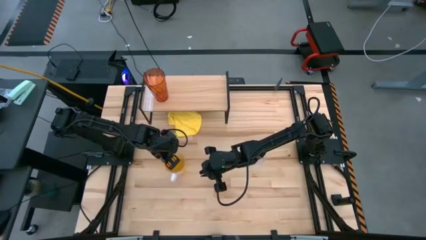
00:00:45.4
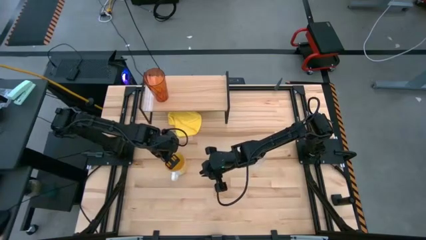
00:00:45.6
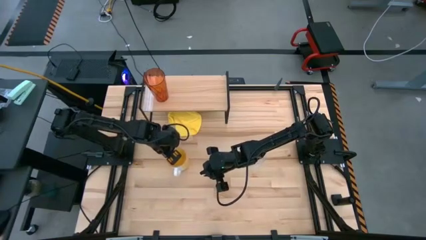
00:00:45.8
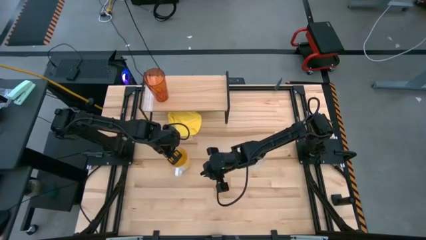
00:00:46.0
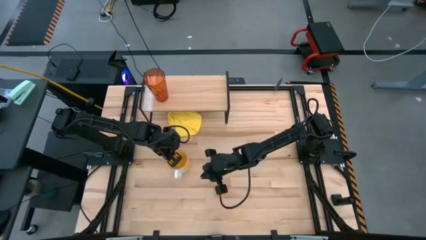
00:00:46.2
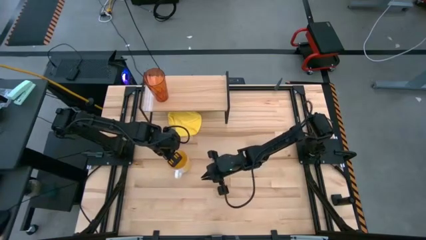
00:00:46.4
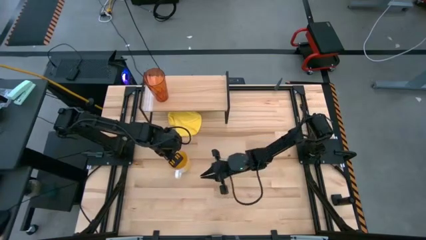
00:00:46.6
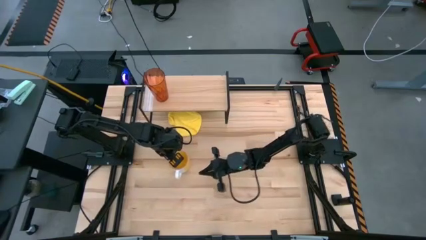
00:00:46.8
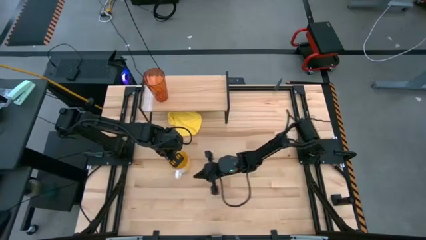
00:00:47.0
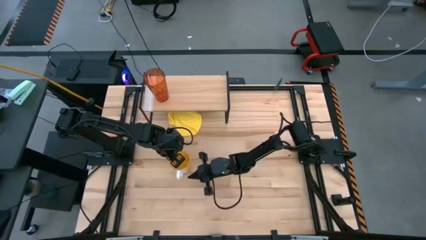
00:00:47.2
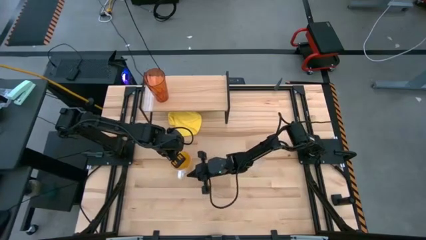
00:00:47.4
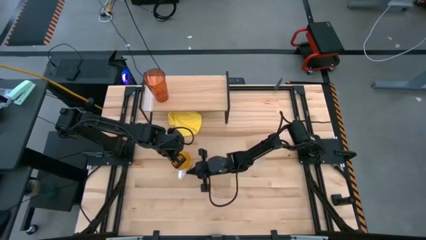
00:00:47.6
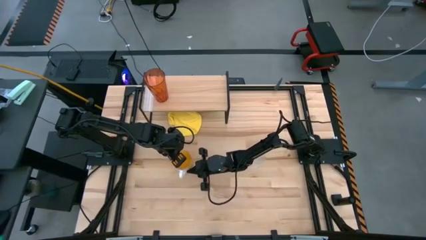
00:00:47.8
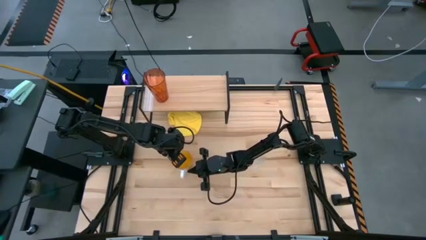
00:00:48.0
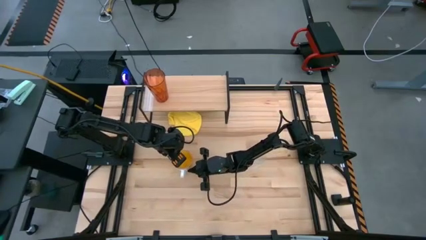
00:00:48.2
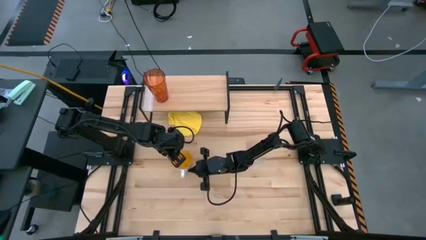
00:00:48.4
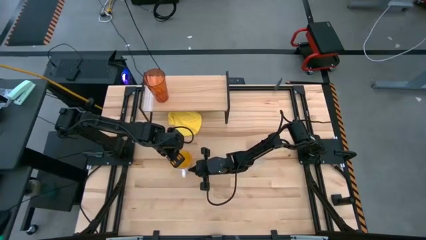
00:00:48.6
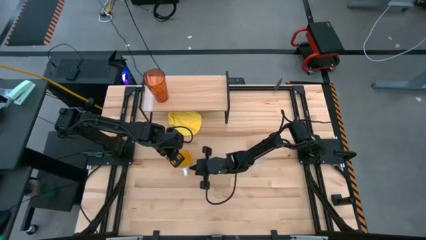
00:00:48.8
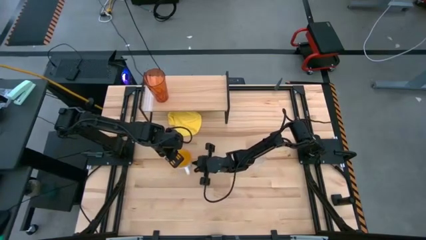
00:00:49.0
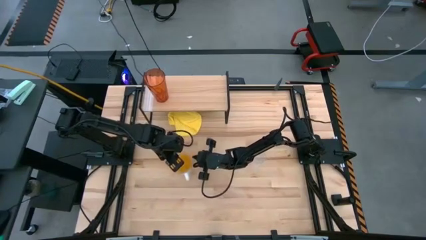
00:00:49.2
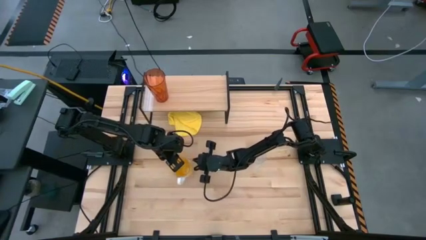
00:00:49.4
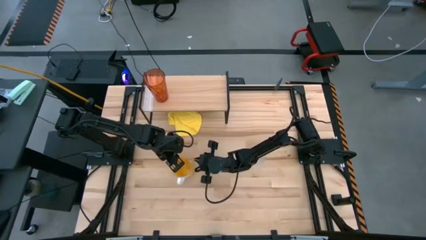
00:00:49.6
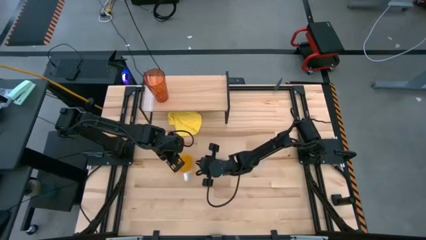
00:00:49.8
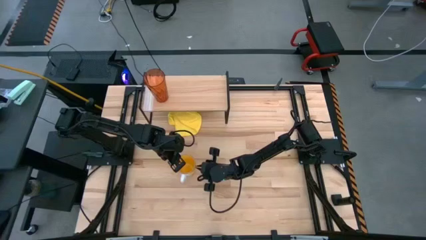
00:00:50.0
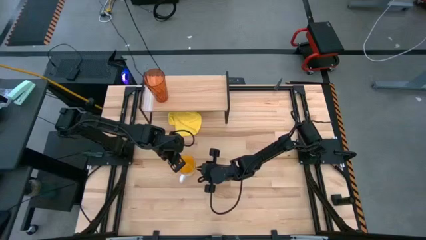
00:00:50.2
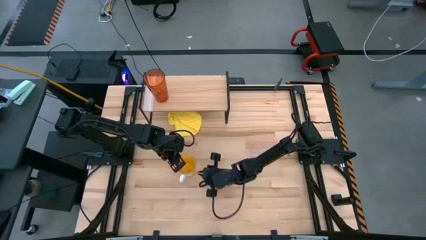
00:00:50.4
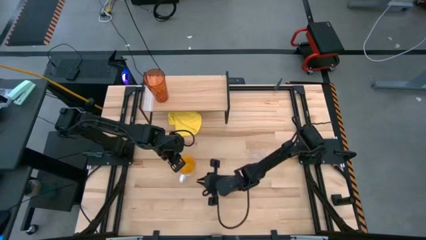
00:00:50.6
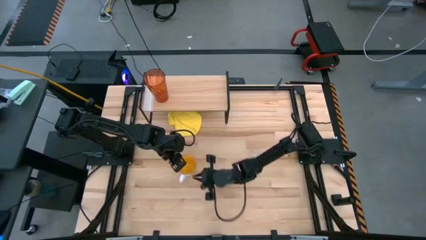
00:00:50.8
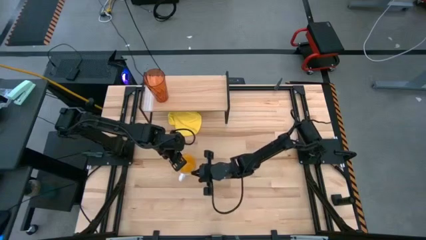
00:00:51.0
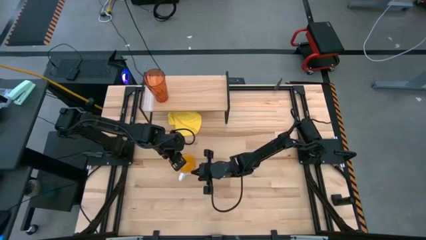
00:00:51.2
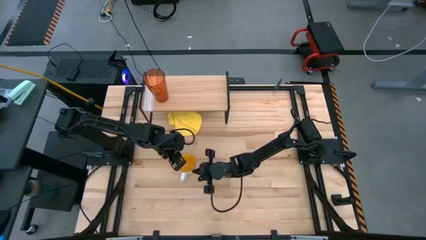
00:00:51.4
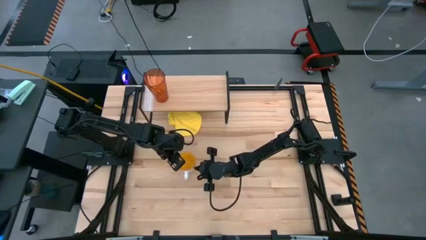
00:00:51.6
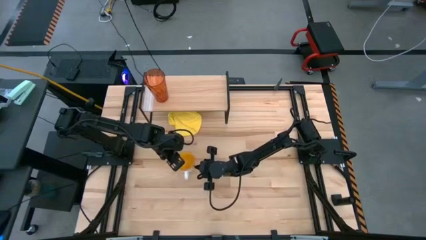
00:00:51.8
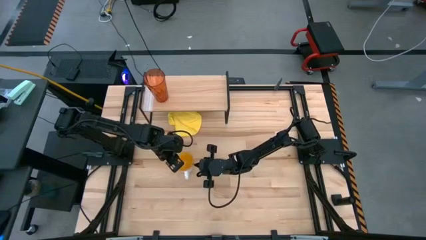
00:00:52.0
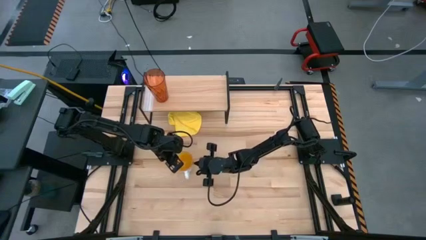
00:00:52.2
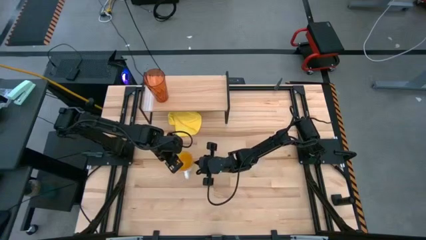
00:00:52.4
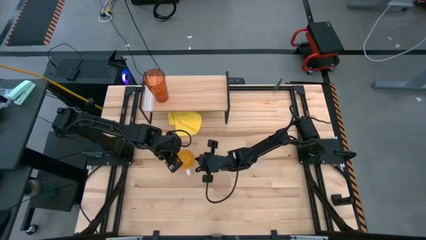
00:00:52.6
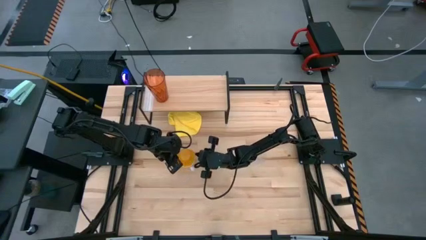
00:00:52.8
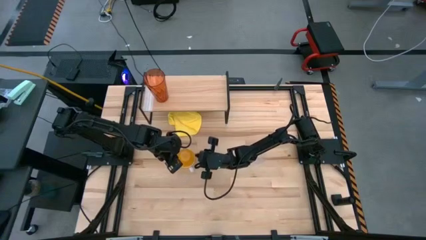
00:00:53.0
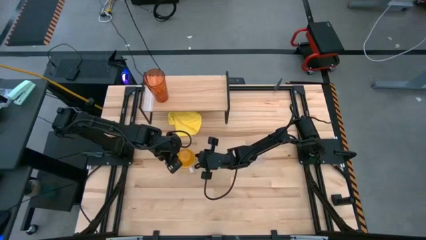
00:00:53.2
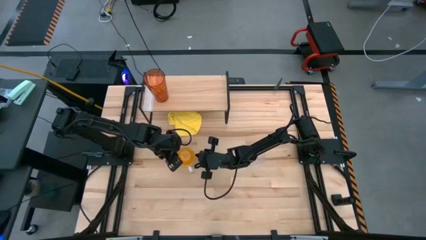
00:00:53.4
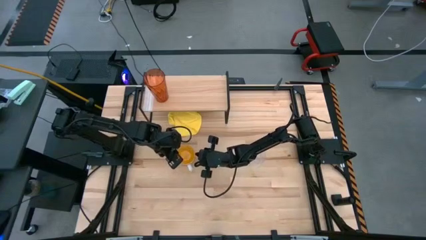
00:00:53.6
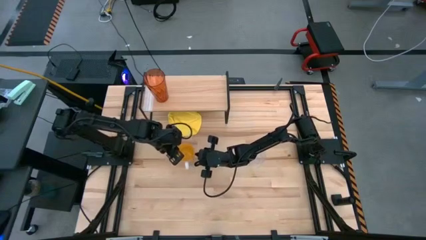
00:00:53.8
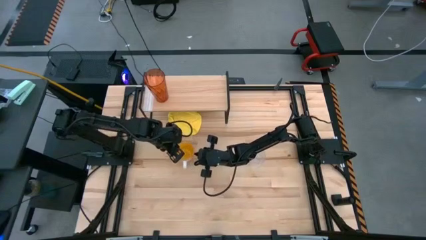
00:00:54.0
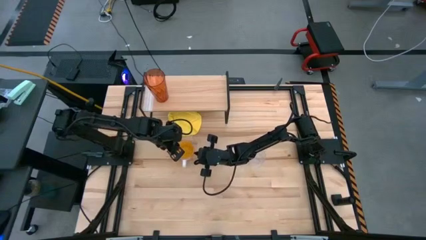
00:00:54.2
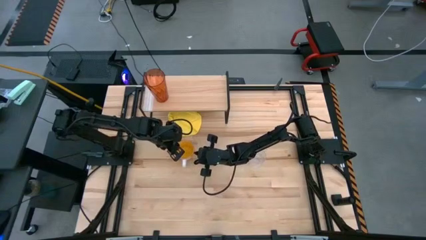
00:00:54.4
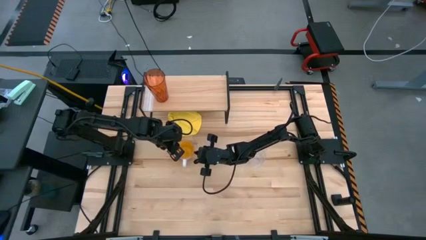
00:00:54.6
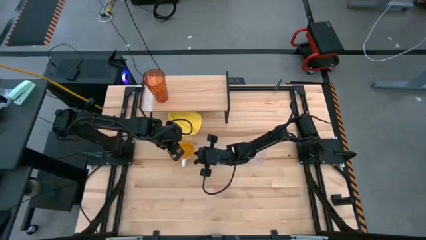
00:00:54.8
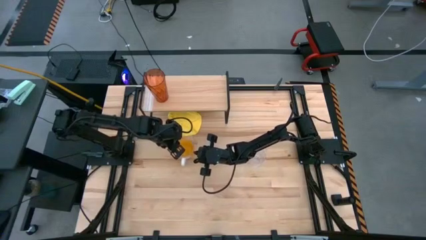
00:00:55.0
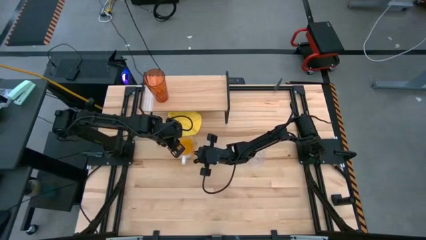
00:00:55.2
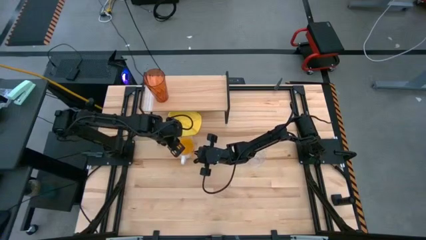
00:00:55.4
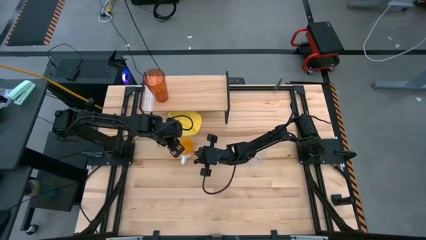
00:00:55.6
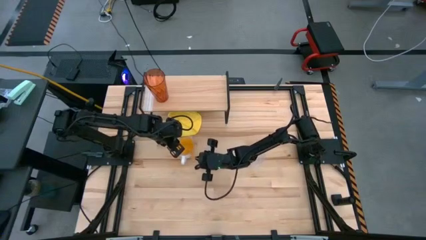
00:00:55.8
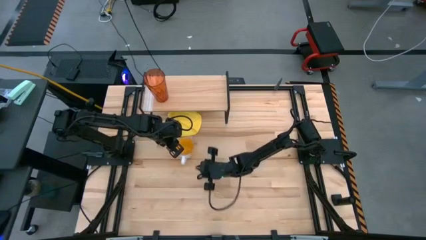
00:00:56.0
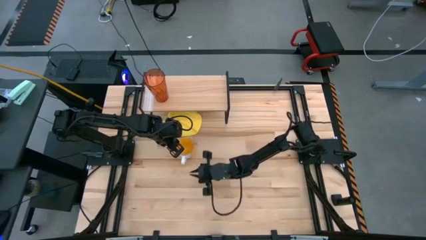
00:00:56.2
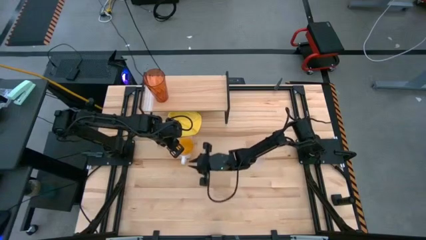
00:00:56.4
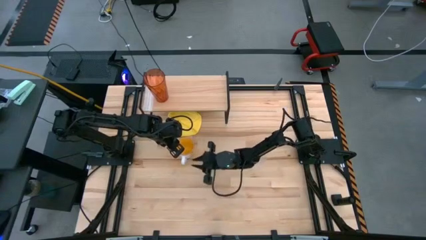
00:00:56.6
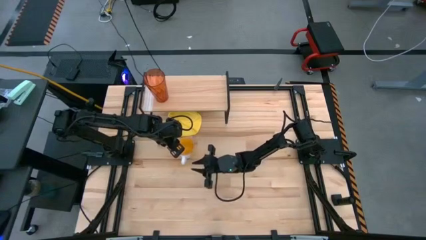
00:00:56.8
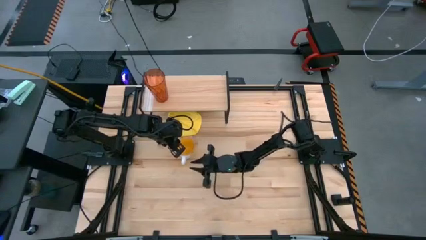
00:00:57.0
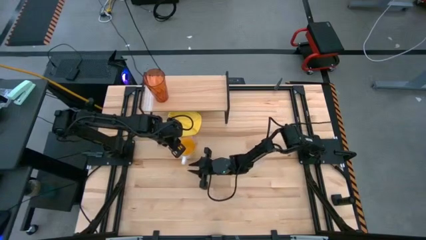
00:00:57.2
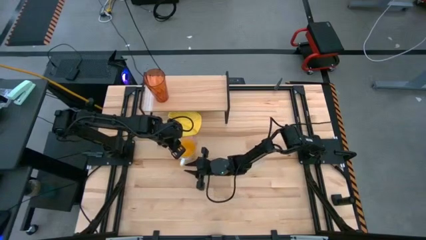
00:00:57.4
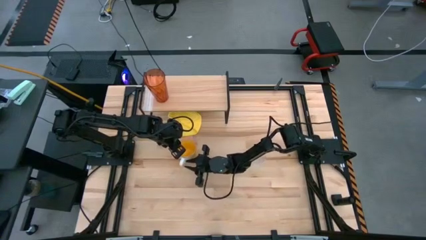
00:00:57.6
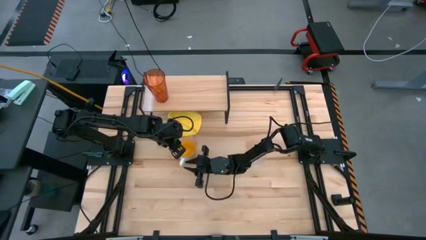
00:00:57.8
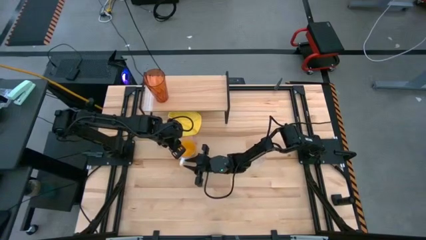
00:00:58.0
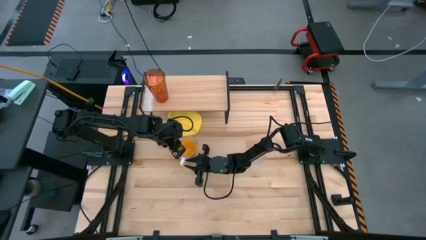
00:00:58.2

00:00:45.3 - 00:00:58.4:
Task: Stack small to large cups/mugs on shelf
Put the yellow mug on the shelf

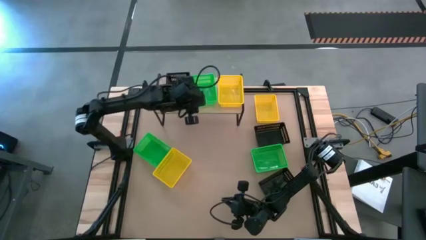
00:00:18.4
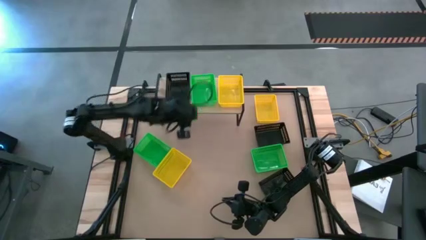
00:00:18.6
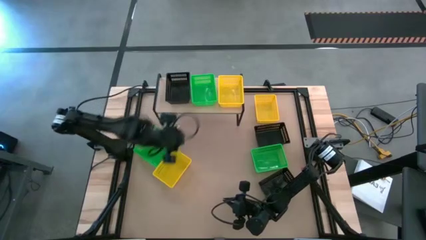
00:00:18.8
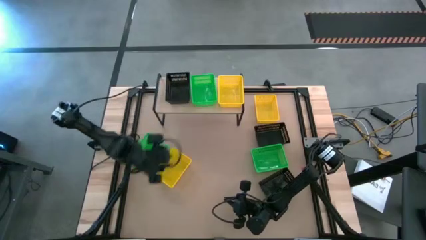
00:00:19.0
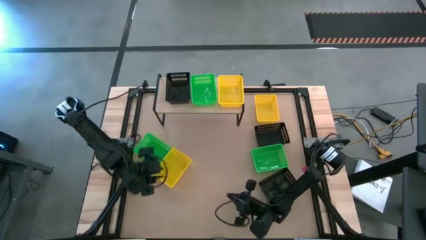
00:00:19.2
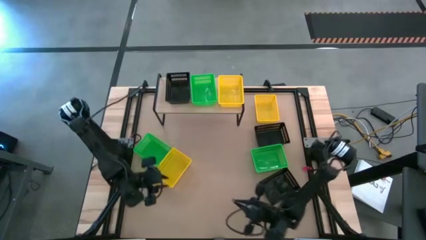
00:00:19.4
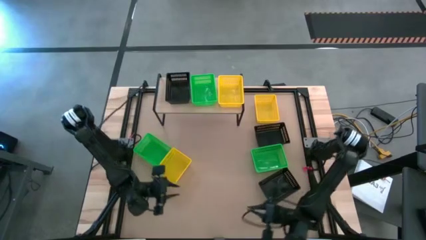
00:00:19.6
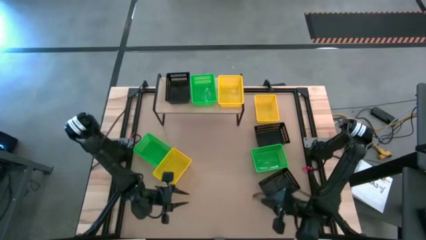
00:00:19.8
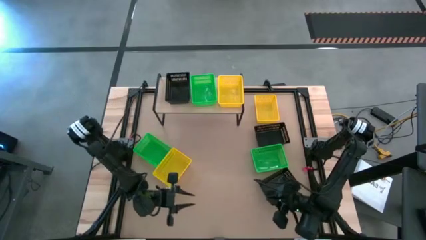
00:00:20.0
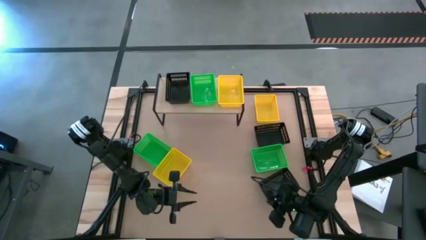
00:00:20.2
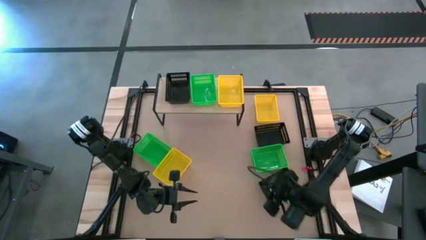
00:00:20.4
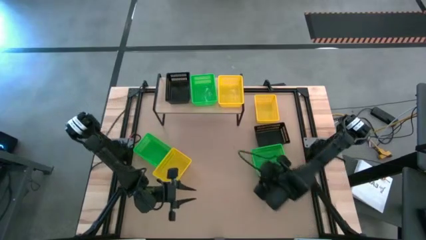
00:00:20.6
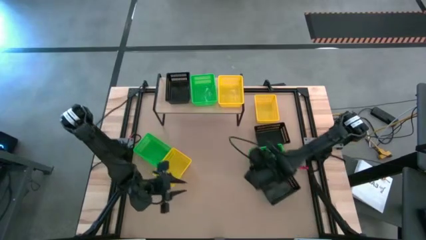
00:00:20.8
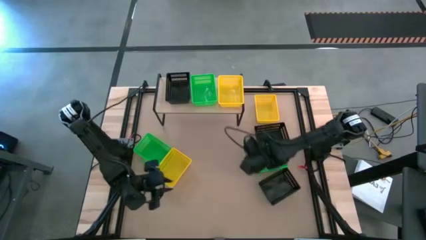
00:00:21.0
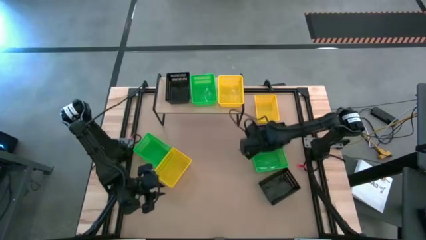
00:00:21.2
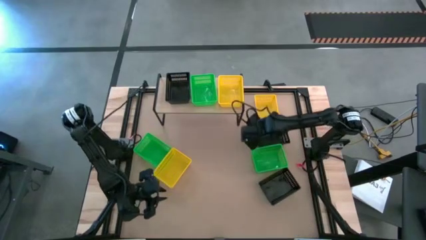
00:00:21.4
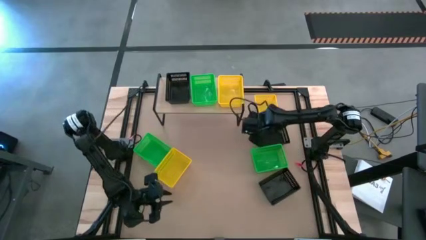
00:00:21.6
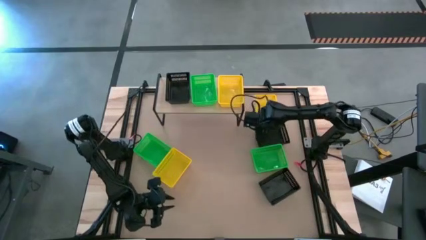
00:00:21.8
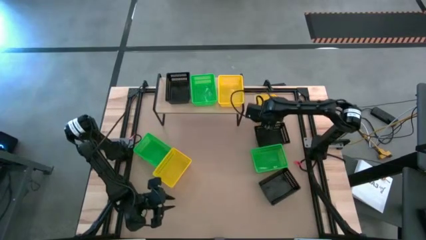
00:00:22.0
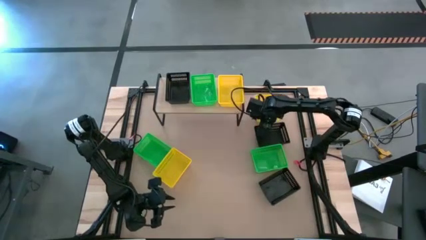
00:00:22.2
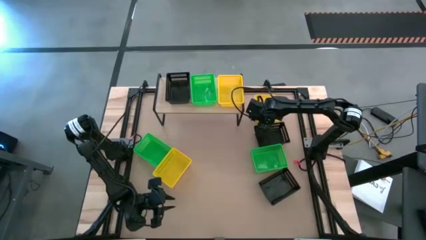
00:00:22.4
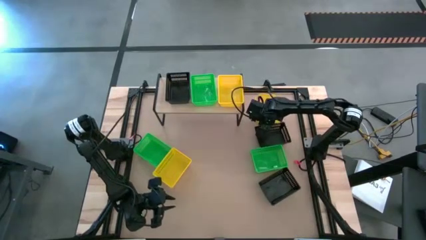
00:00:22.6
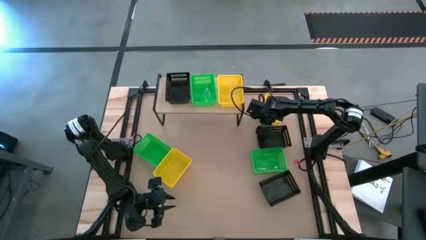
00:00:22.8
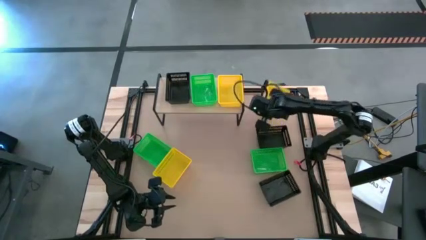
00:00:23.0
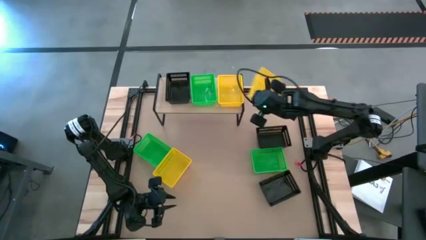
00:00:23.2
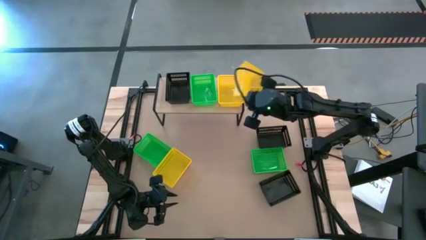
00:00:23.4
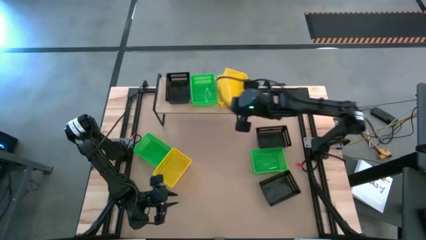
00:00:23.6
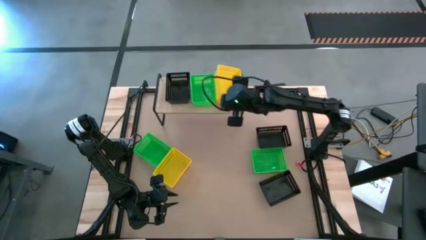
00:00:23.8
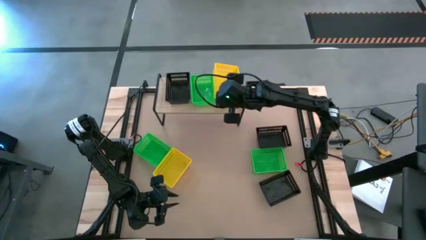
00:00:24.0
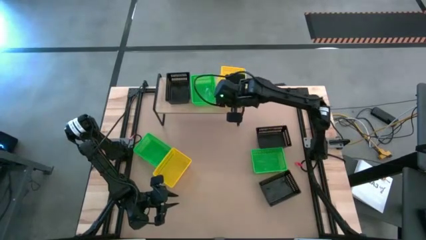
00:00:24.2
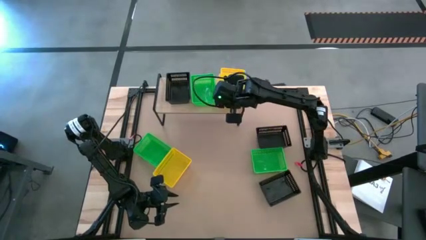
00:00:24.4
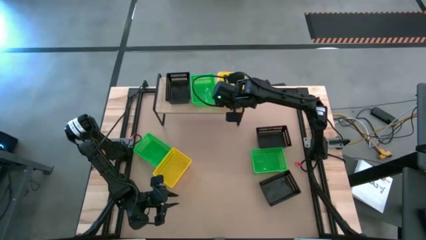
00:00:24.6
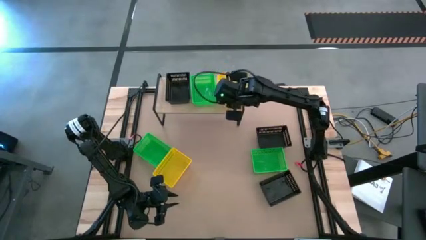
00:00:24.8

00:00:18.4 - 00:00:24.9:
Task: Stack baskets on shelf by color
Stack the right yellow bin on top of the yellow bin on the shelf
